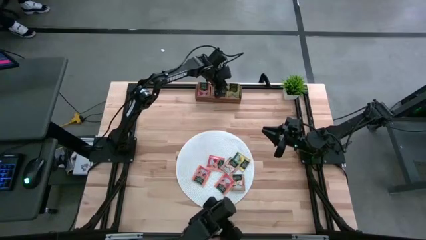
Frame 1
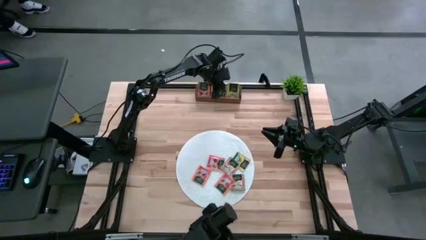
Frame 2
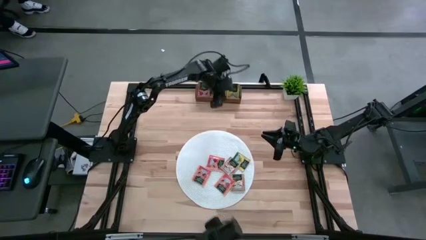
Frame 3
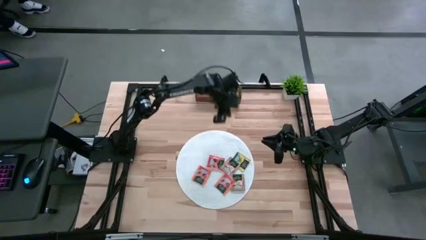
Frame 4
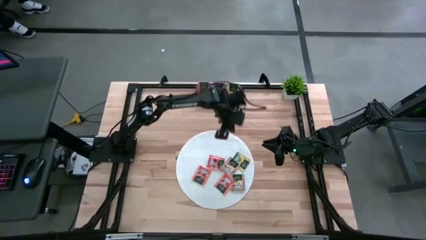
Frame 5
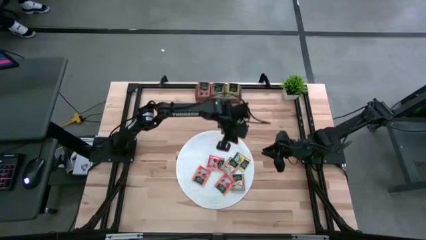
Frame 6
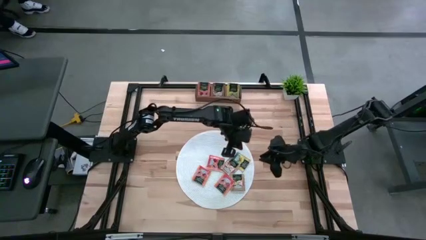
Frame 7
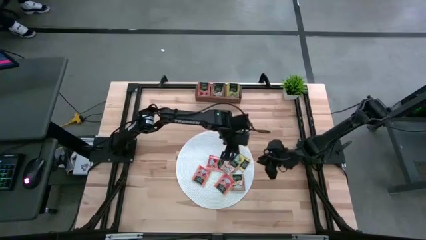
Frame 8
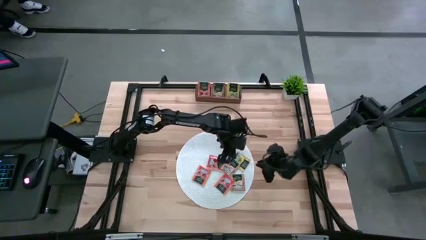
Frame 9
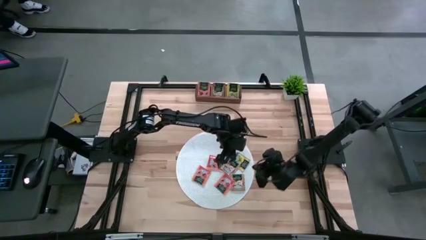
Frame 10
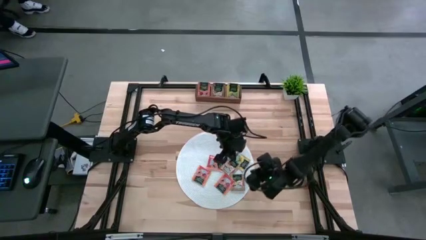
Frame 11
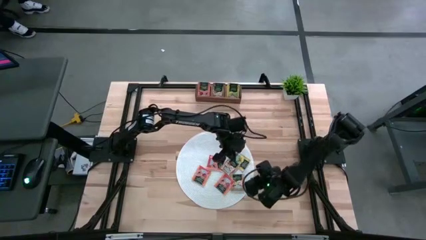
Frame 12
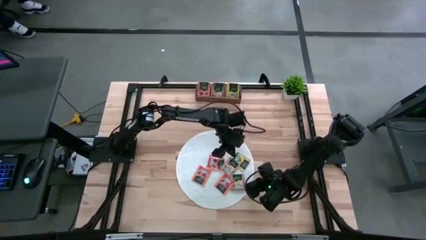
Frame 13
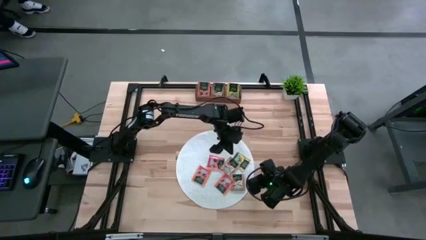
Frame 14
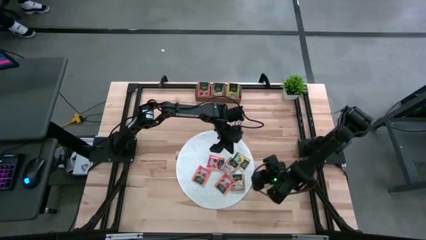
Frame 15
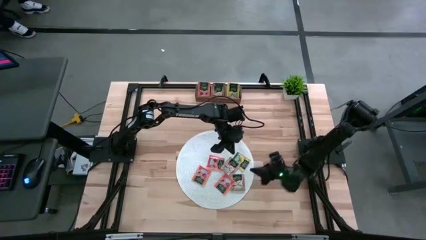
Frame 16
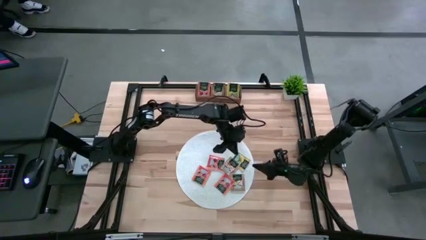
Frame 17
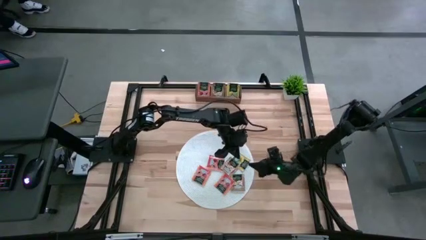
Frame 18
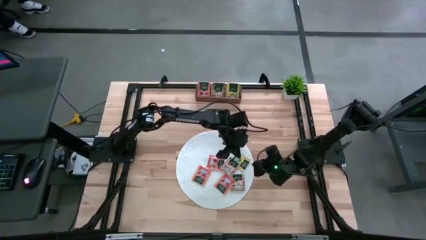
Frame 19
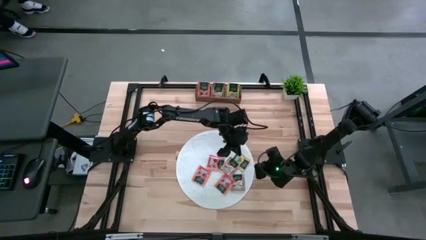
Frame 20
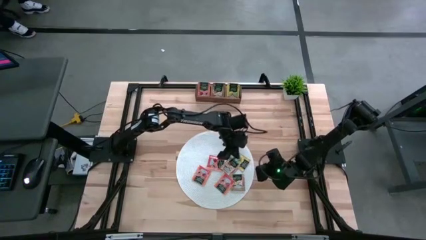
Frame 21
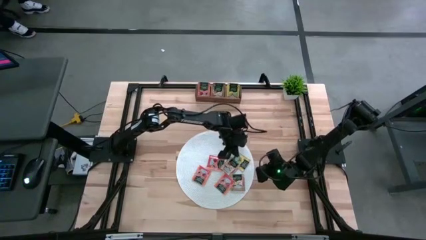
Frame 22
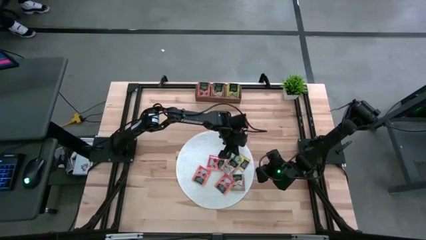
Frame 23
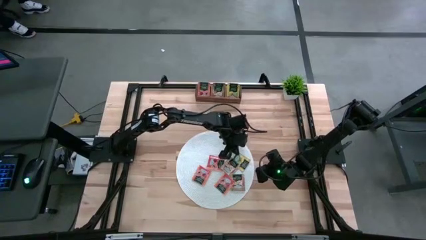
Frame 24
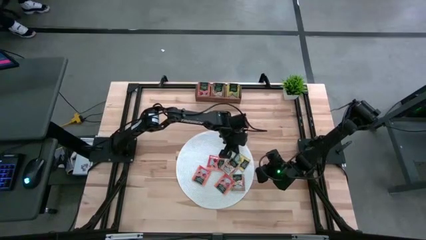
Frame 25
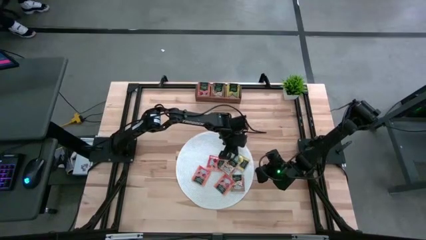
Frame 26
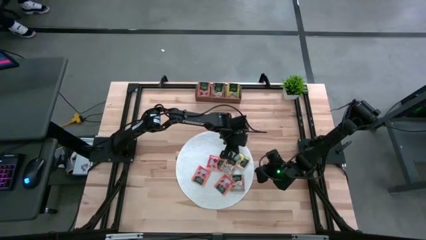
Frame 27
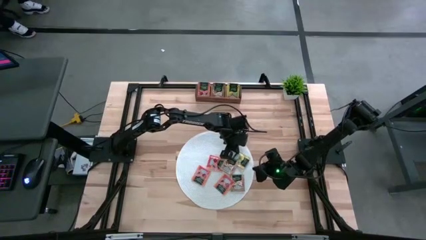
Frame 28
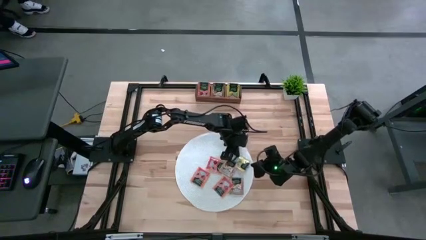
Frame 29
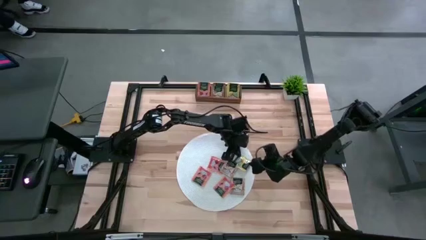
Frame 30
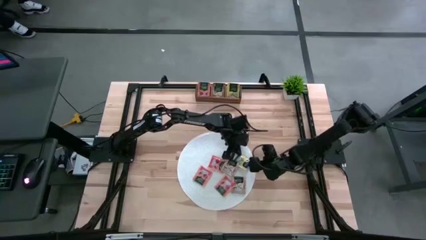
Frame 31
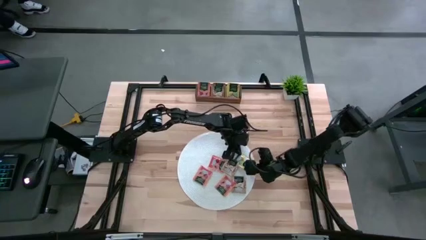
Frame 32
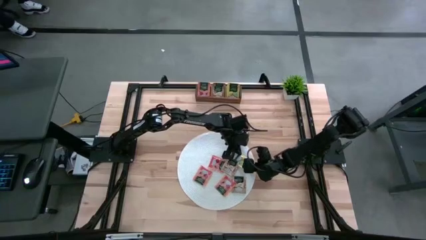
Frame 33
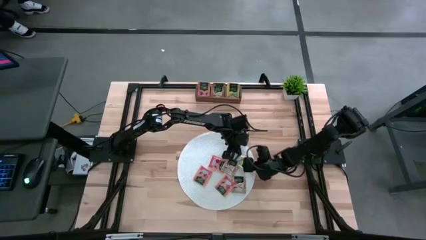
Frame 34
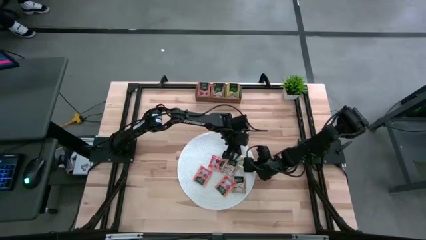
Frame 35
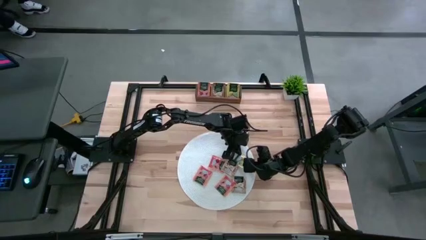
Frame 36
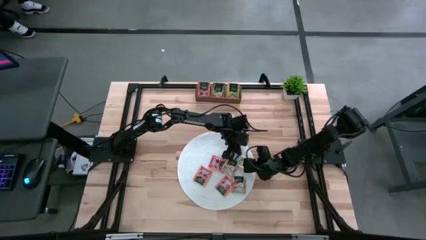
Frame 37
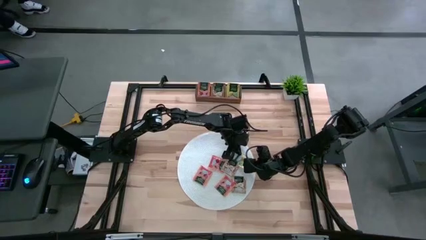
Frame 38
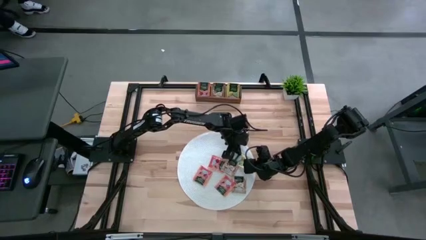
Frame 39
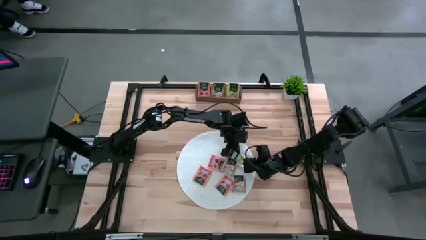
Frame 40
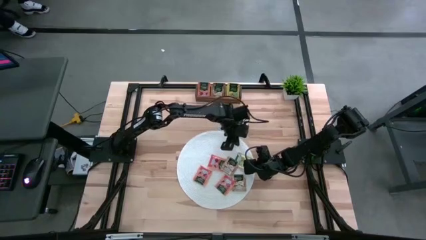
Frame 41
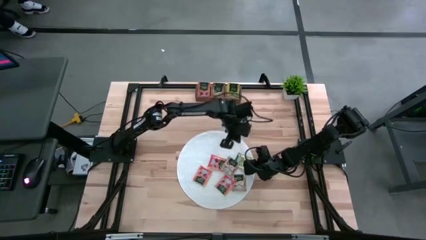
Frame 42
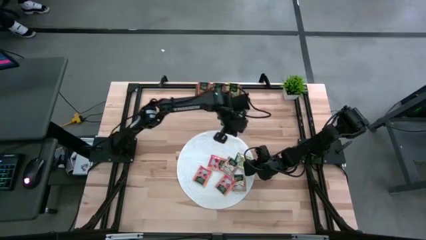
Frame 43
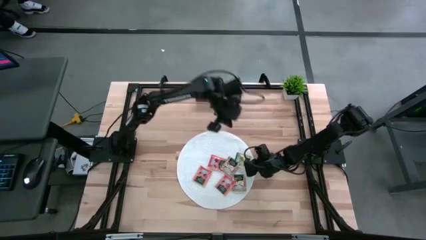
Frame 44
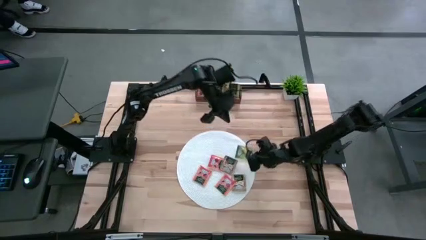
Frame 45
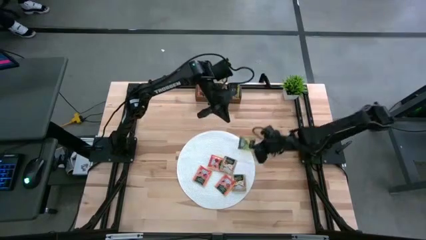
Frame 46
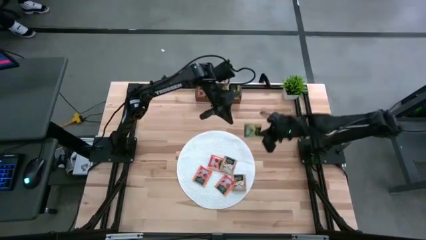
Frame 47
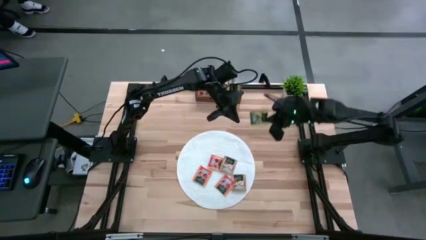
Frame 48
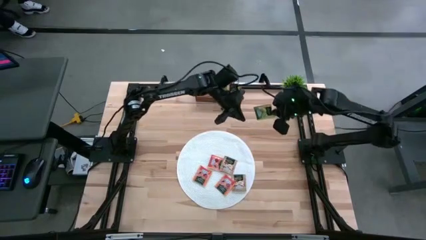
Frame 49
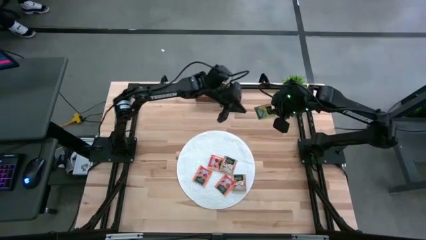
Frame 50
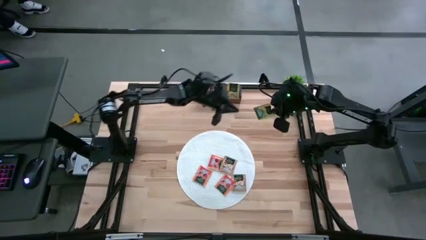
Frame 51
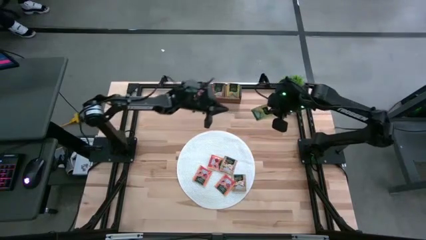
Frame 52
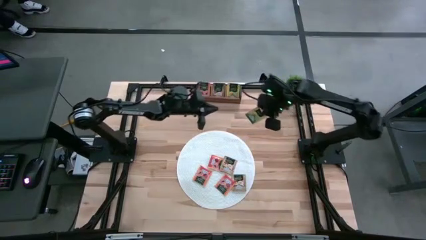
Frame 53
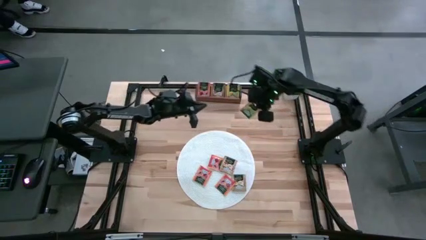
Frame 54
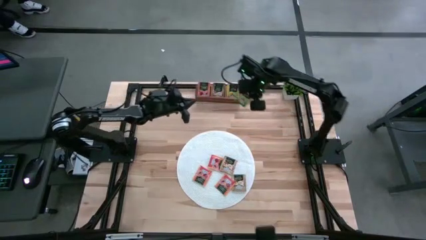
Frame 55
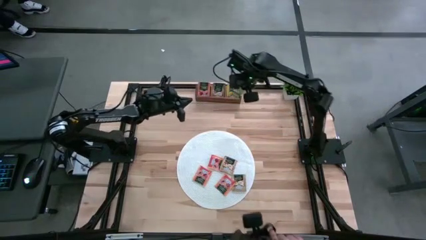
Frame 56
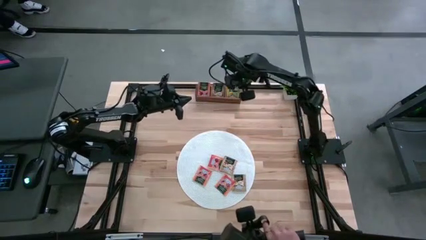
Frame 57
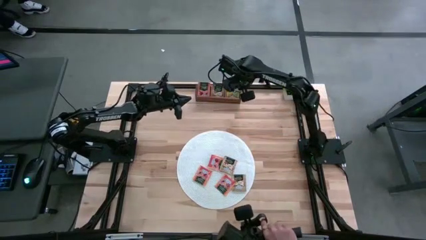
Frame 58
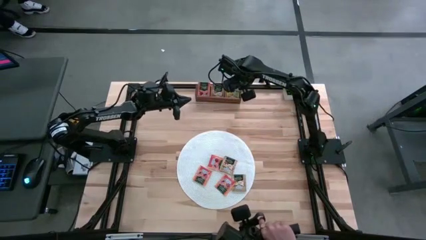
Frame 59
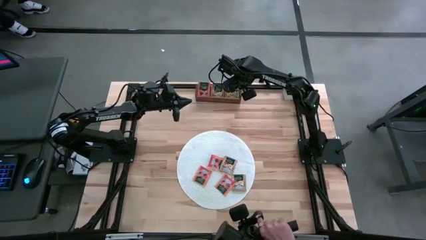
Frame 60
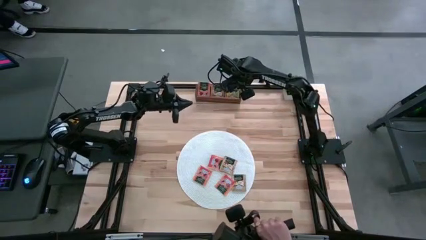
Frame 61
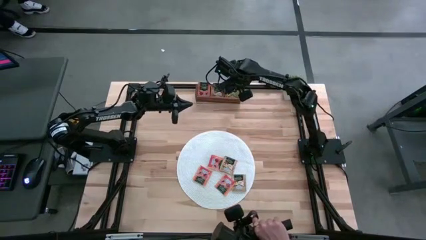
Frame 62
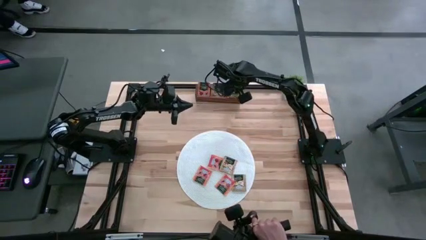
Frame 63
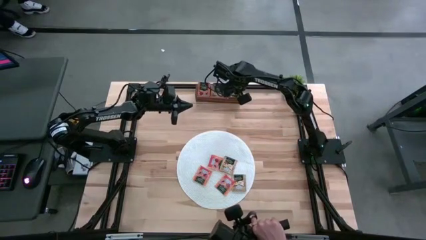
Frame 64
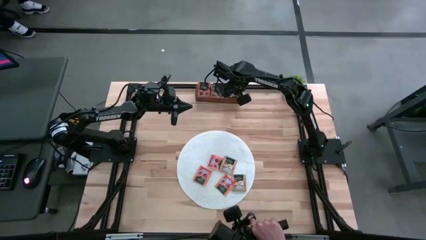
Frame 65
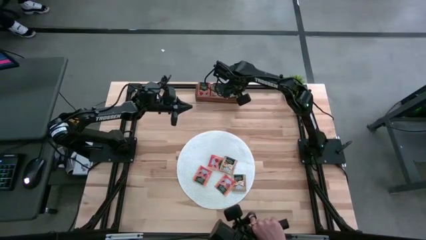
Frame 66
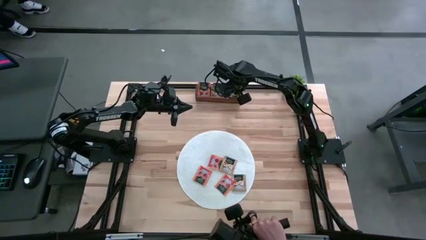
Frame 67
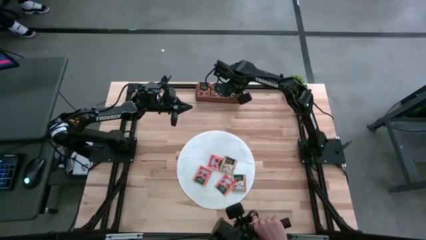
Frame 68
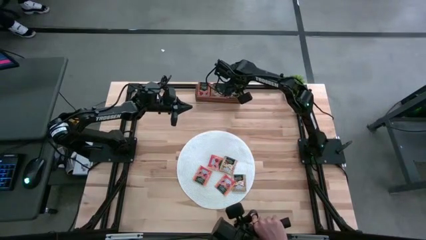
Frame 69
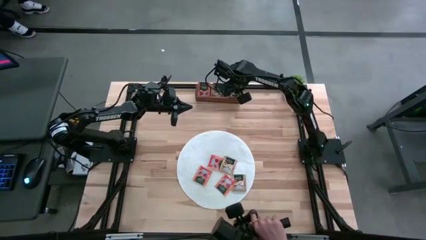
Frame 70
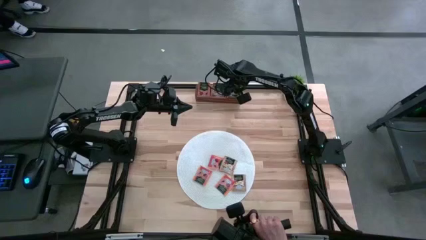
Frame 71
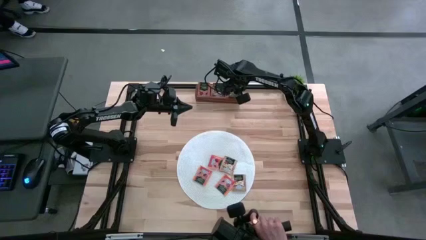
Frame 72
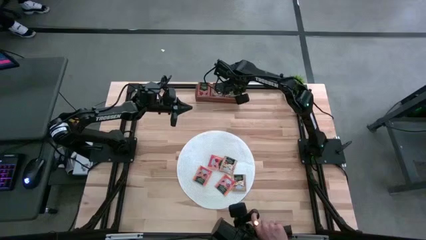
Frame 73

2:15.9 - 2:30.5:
Task: Pick & Place Tea
Put the yellow tea bag into the right section of the wooden organizer
